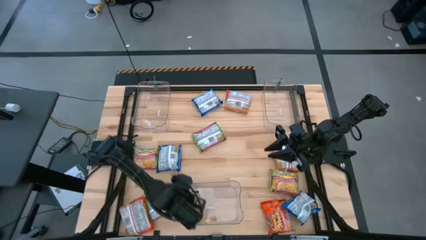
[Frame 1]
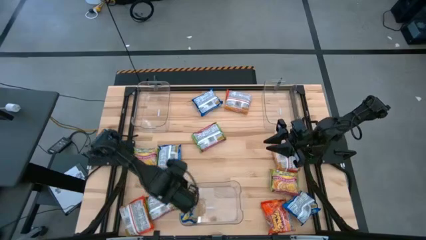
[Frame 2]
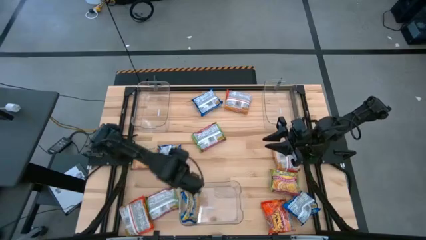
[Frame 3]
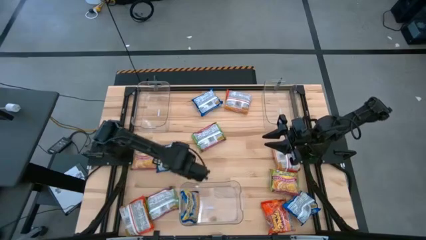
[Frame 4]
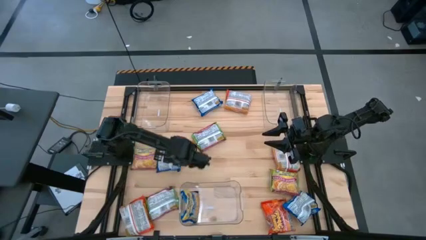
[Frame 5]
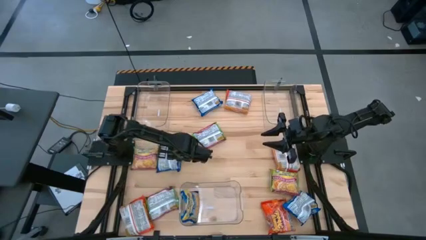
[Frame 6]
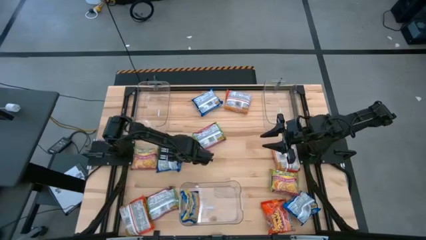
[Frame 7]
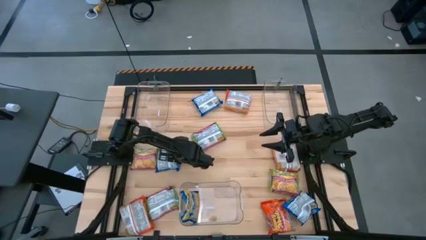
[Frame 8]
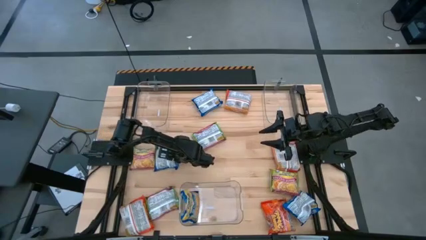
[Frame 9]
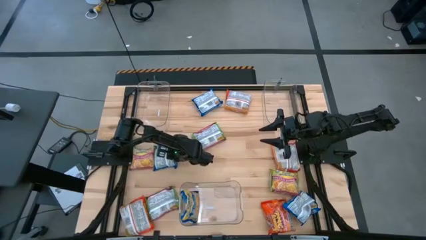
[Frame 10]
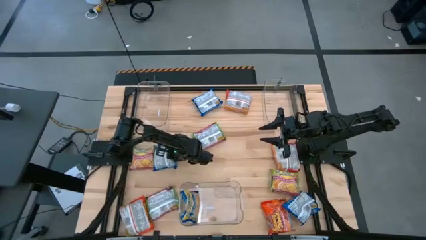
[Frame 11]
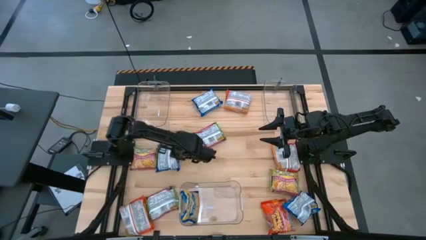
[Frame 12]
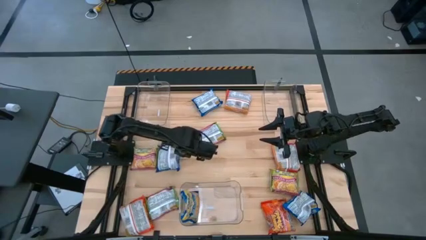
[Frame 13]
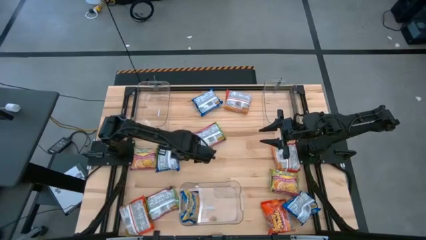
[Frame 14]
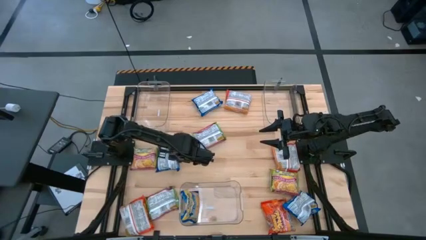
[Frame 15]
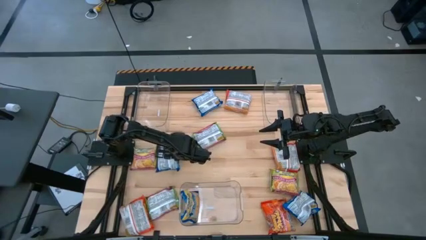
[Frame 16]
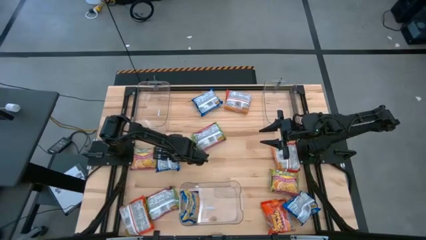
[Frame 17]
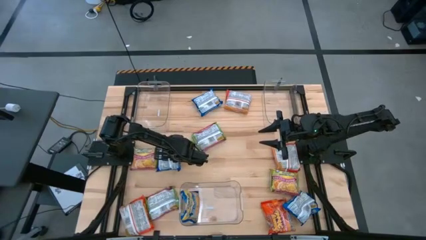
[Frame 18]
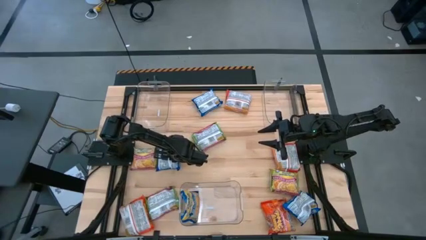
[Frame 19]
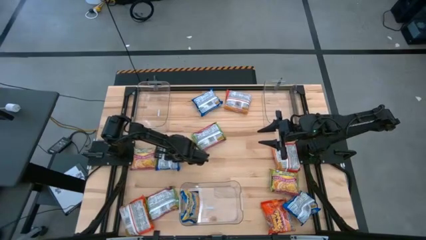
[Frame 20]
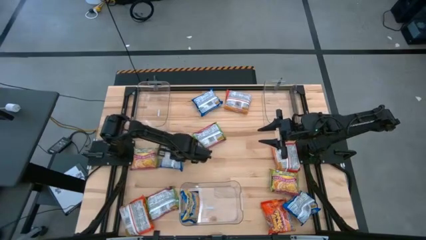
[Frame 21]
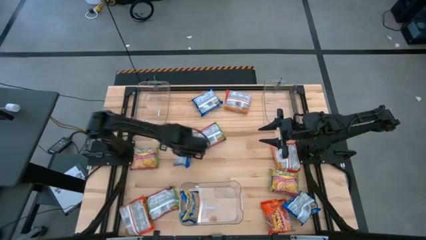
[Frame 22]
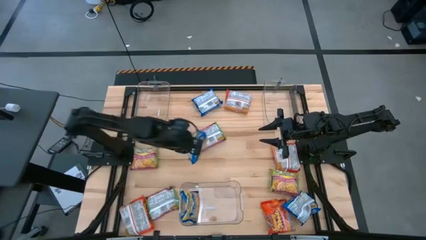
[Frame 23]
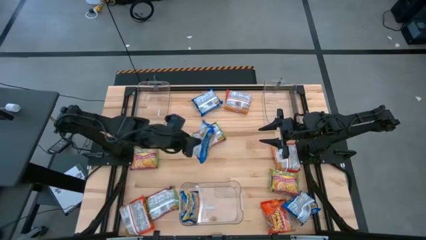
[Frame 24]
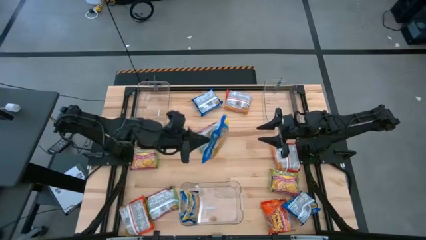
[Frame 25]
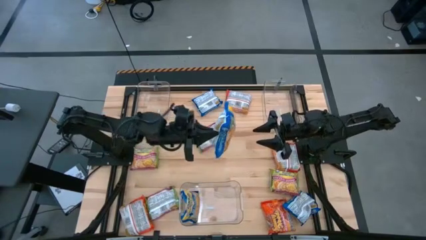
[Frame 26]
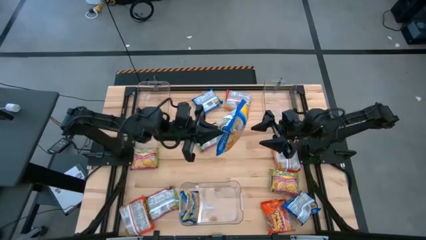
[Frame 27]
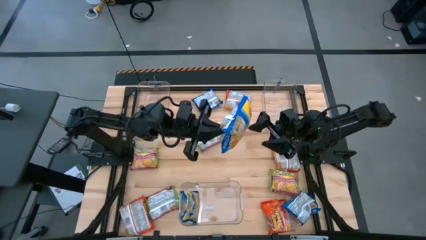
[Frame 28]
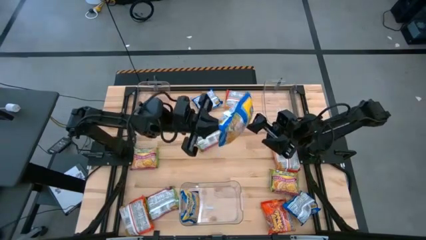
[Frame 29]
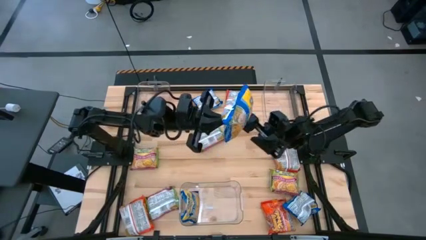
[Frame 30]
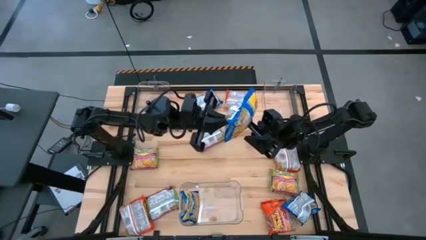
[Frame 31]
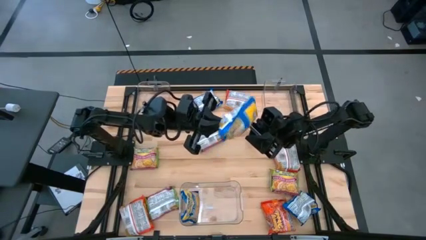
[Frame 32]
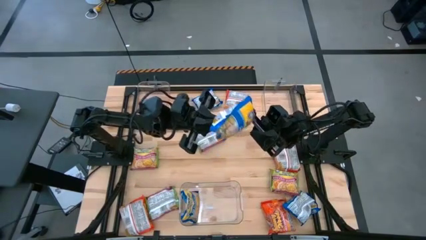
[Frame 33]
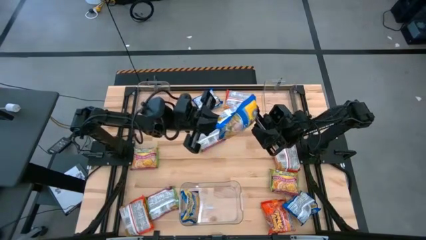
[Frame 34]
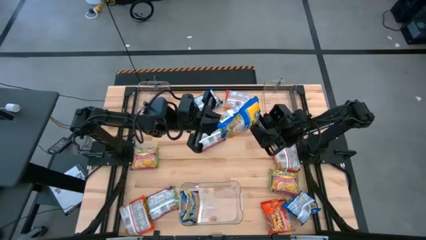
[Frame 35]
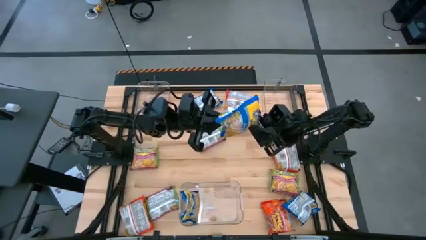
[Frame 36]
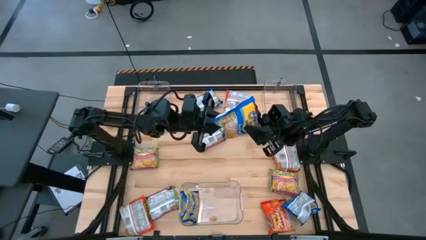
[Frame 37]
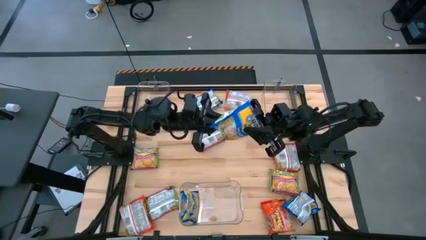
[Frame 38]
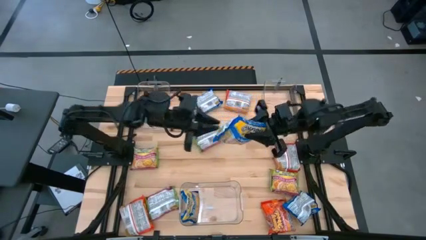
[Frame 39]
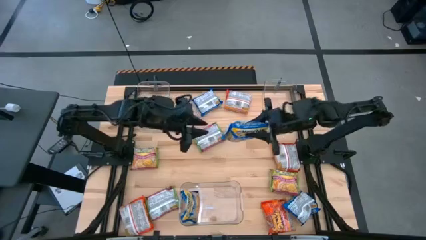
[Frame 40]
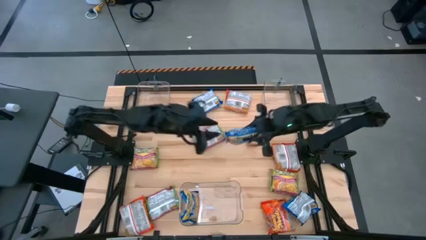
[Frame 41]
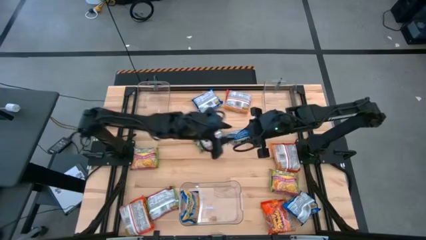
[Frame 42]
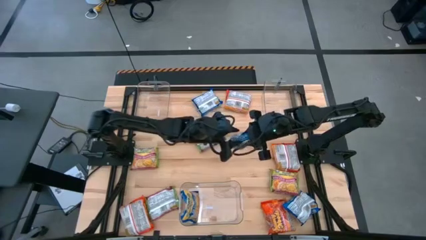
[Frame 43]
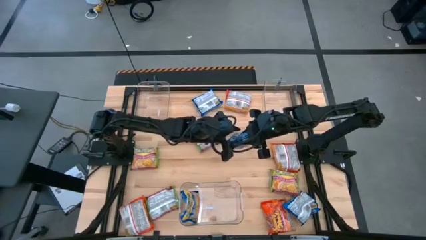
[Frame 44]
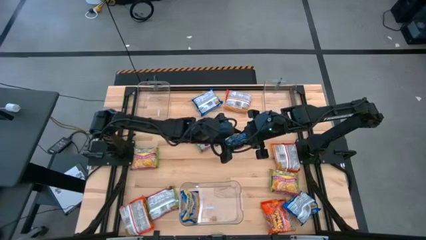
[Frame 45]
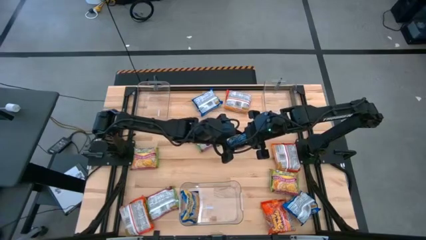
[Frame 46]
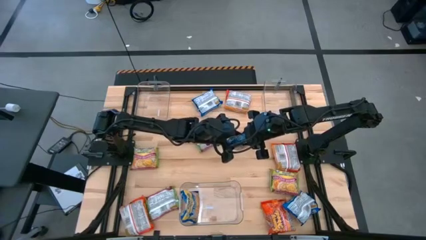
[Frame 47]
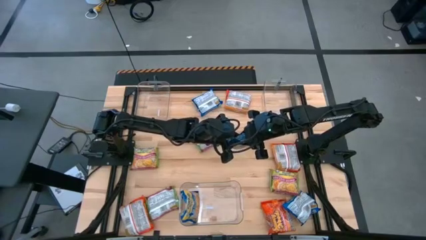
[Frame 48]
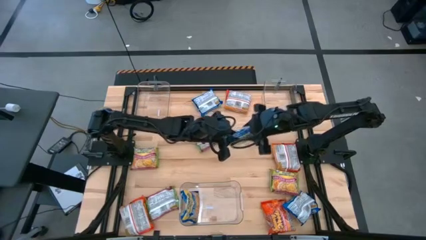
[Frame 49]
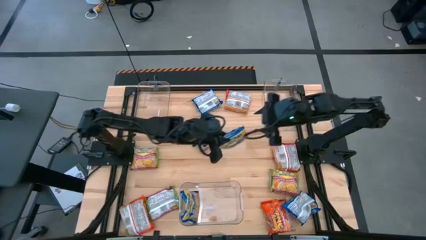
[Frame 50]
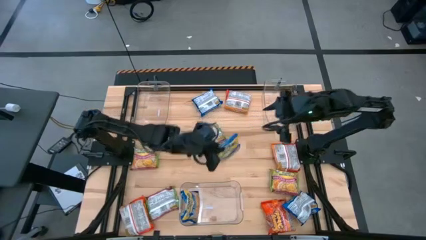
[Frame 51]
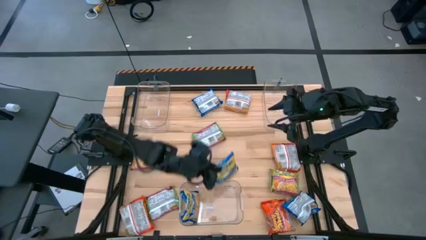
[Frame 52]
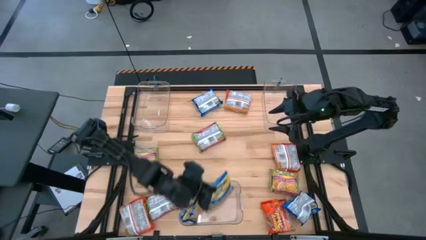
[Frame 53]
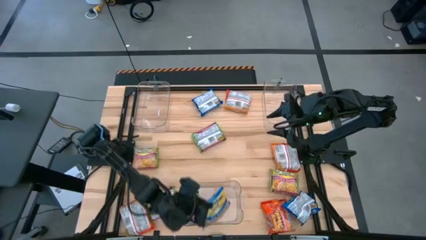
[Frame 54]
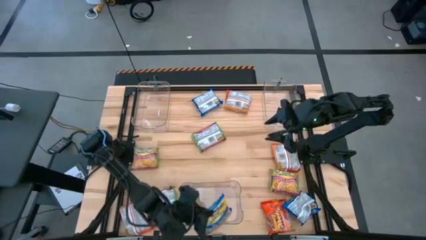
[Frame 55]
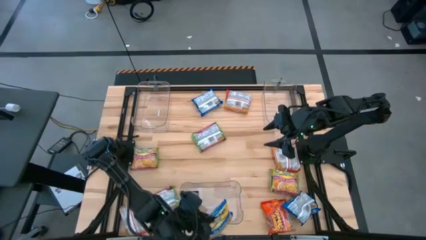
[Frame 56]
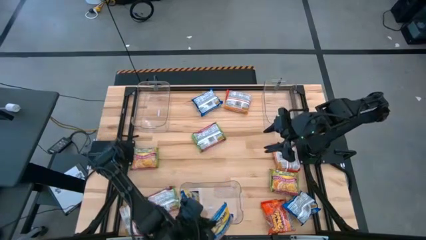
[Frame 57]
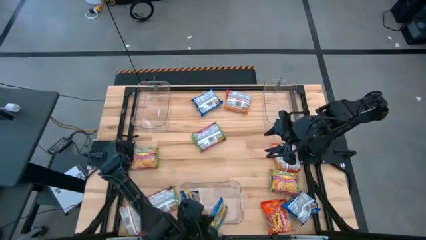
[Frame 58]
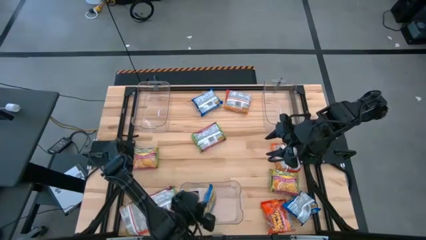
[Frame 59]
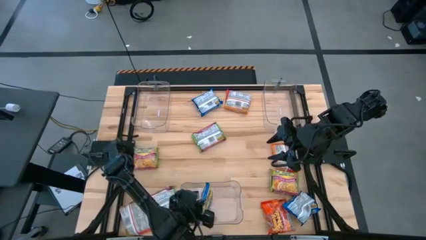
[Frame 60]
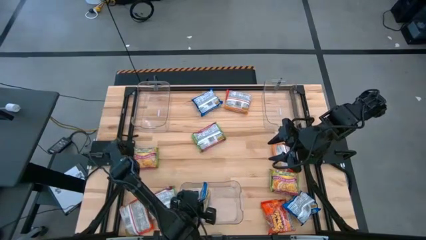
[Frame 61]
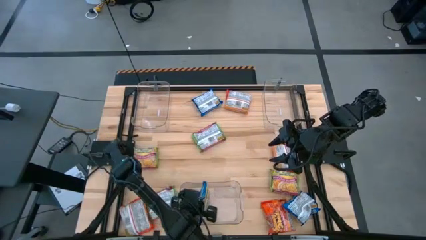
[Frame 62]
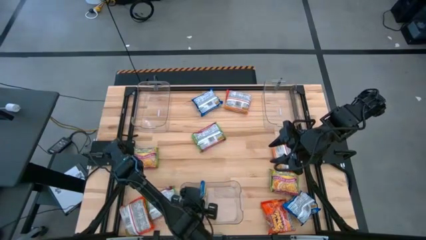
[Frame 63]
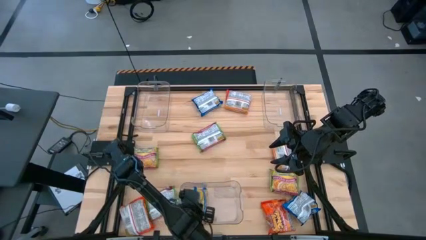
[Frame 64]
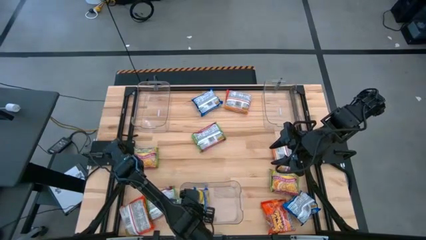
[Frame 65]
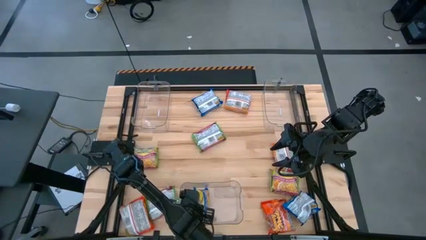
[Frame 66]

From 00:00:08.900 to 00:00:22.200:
Task: Sort Maruchan noodles
Put the blue noodle pack into the bottom transparent bin

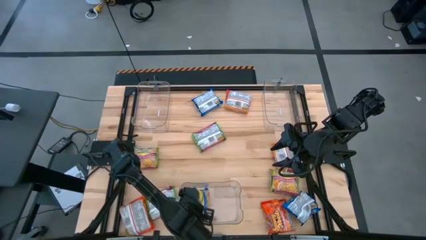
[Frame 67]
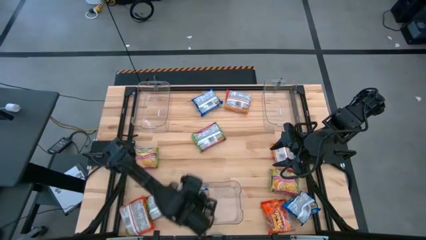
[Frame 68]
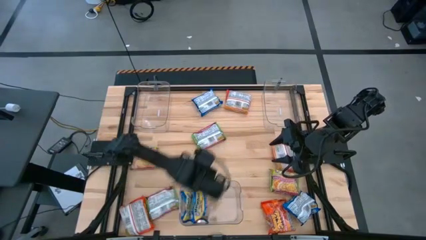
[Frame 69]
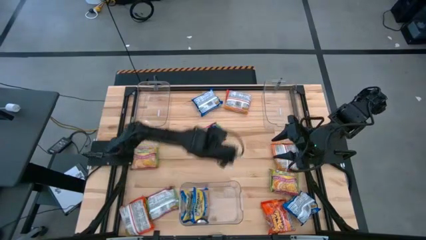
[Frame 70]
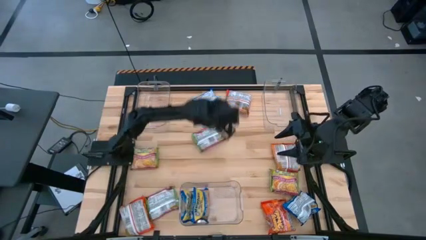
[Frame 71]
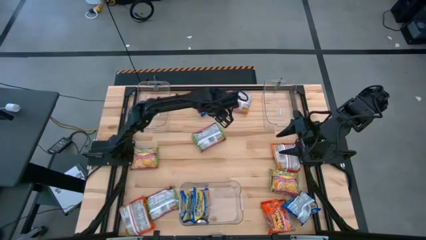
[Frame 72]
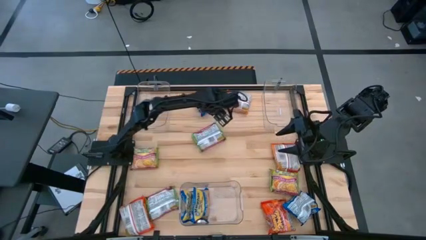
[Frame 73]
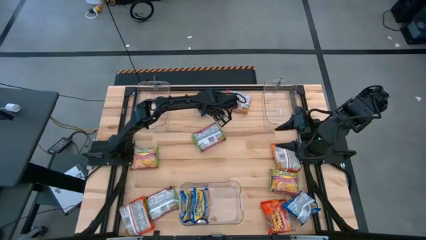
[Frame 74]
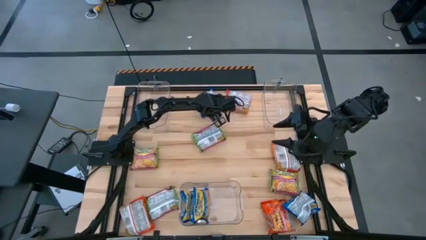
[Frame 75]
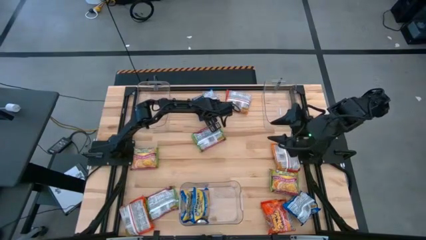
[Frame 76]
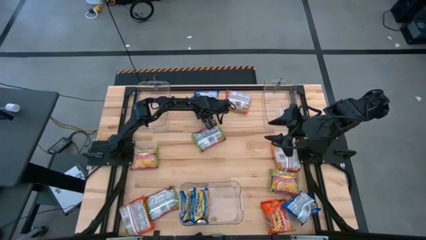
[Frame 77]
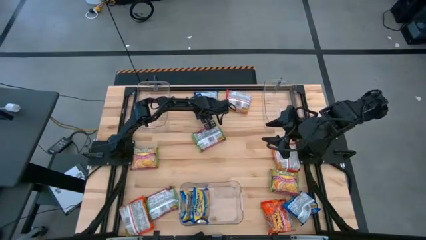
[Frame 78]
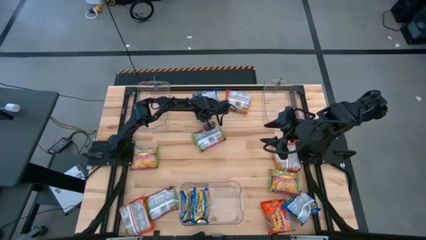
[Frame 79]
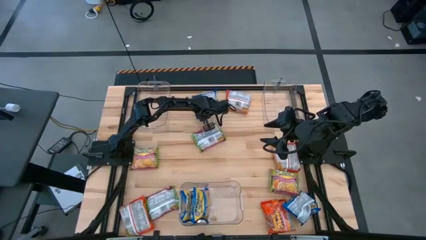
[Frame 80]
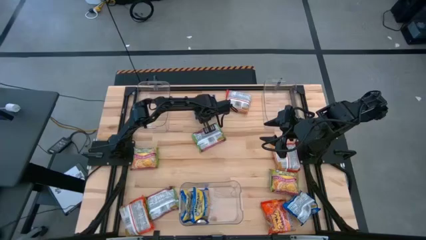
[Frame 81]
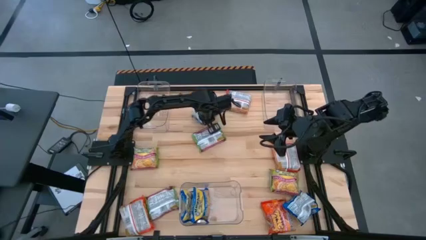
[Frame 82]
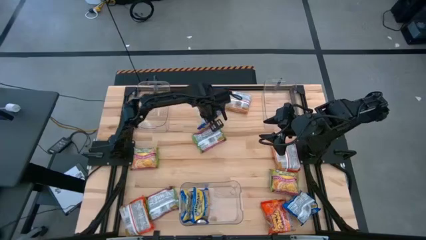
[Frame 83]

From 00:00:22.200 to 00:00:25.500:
Put the blue noodle pack into the bottom transparent bin
